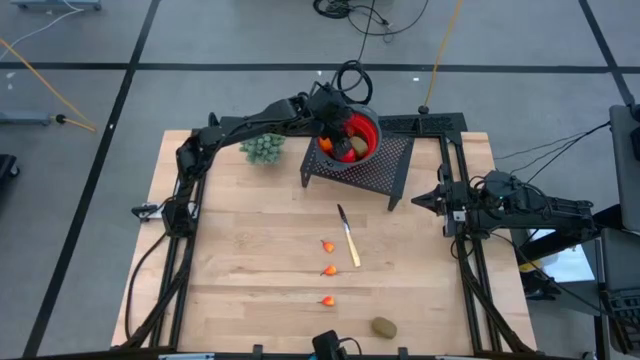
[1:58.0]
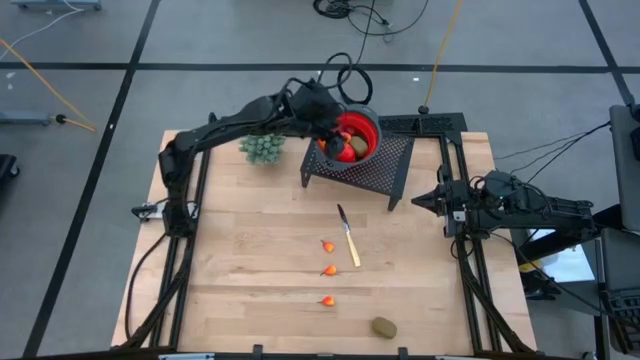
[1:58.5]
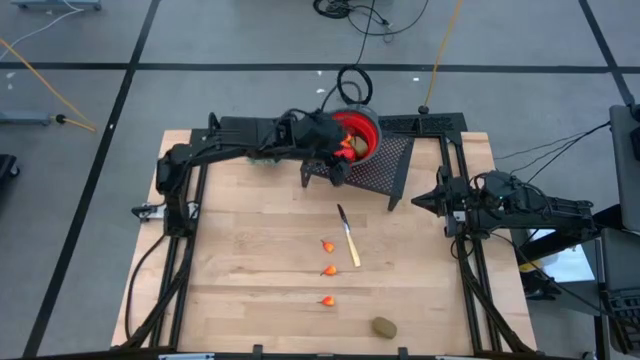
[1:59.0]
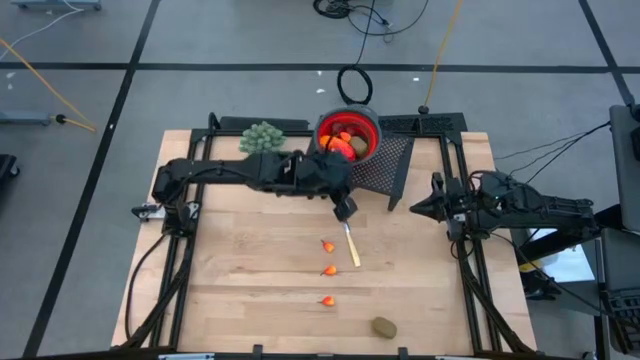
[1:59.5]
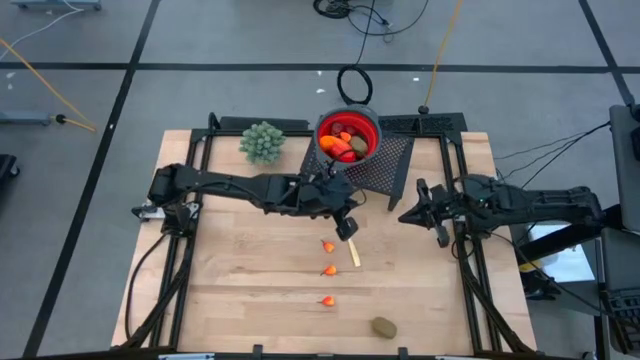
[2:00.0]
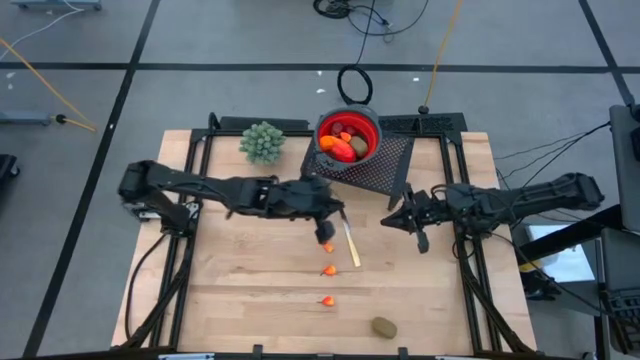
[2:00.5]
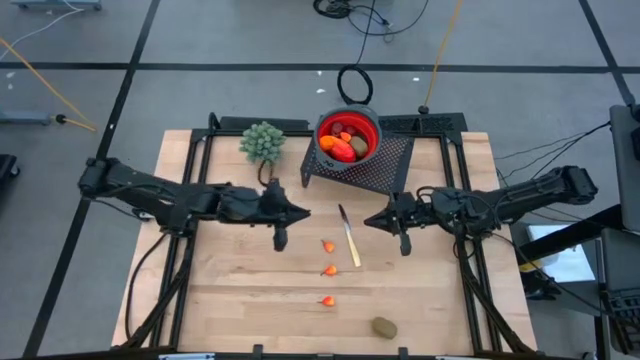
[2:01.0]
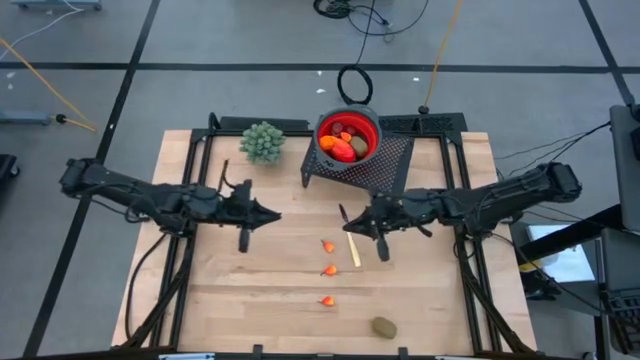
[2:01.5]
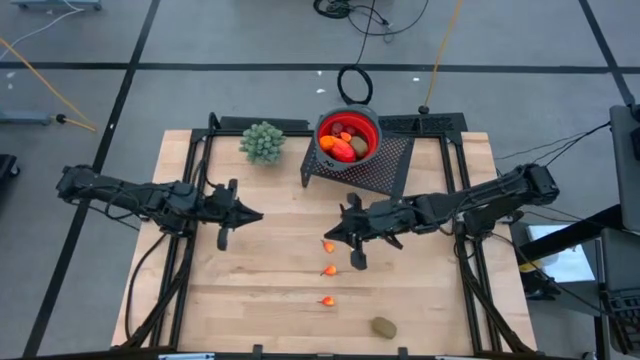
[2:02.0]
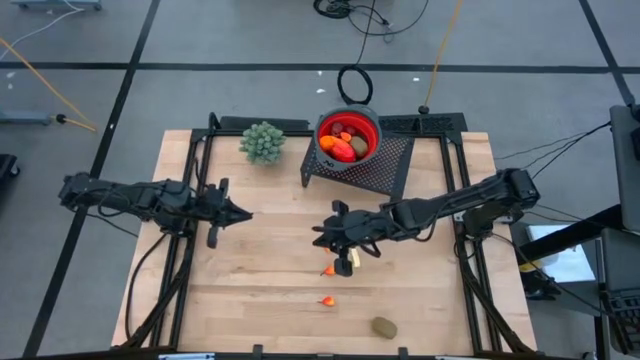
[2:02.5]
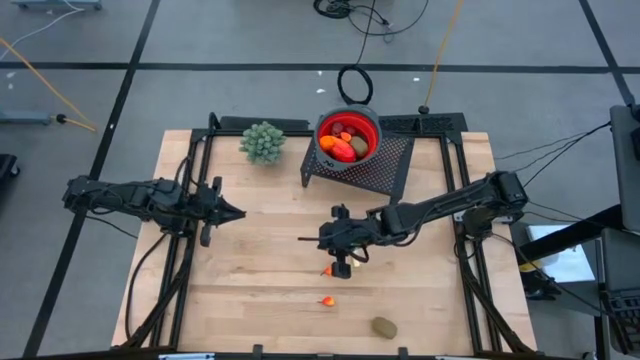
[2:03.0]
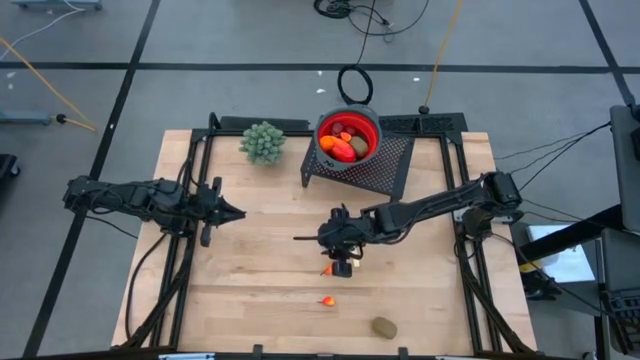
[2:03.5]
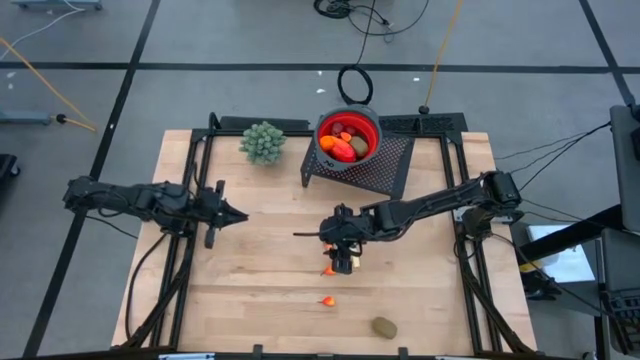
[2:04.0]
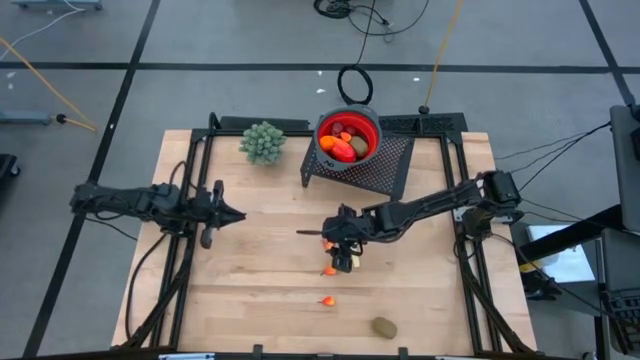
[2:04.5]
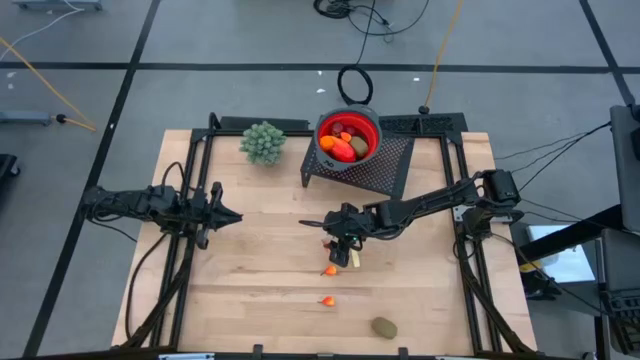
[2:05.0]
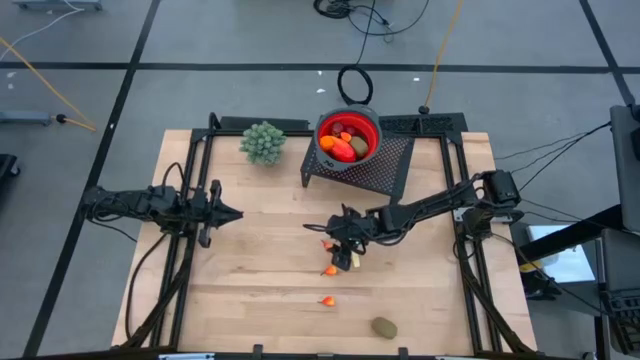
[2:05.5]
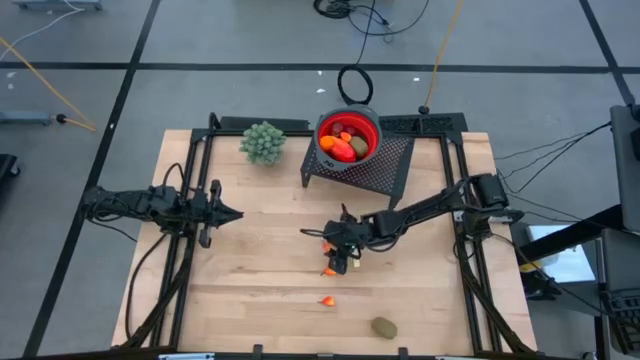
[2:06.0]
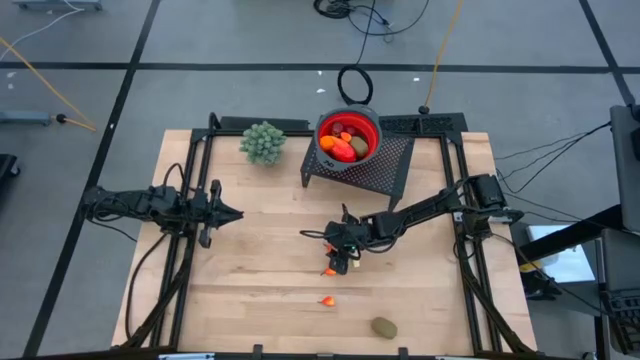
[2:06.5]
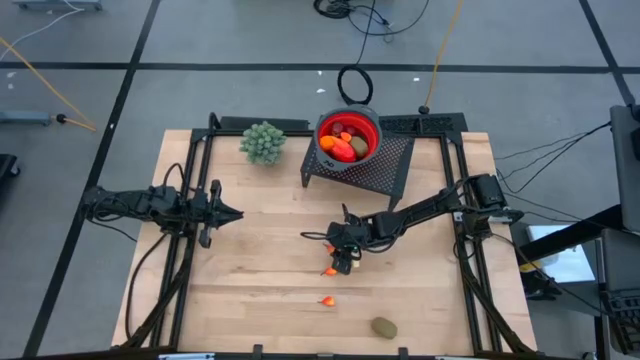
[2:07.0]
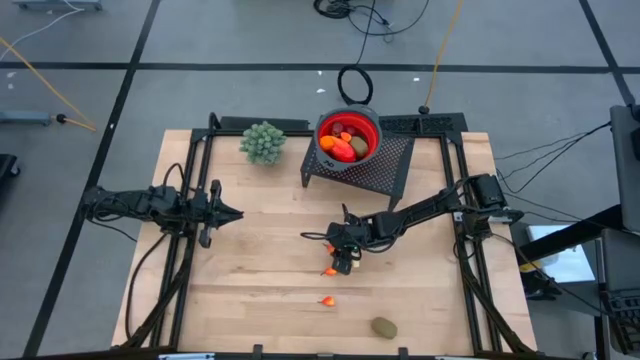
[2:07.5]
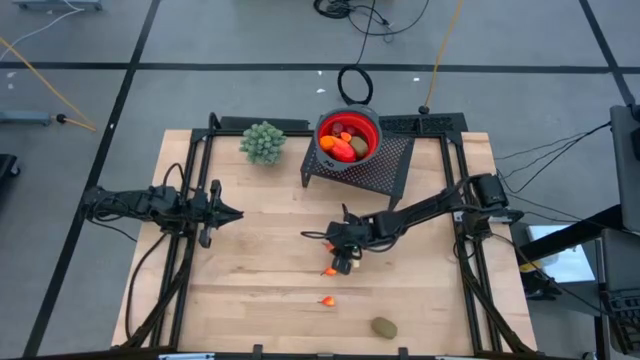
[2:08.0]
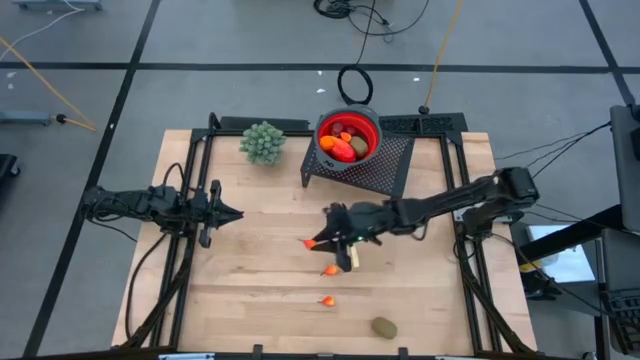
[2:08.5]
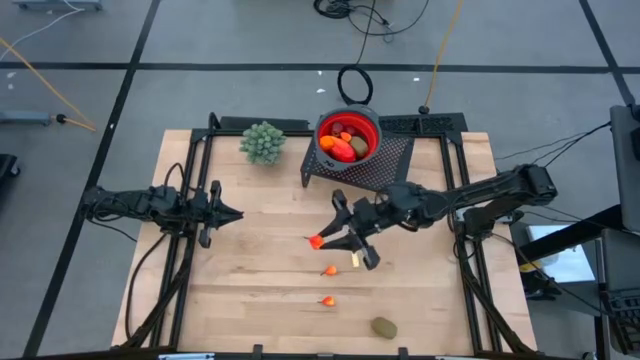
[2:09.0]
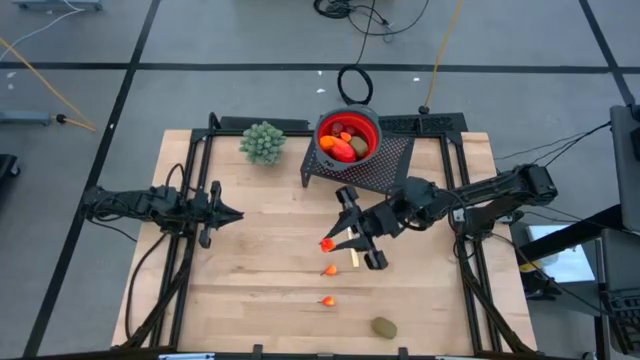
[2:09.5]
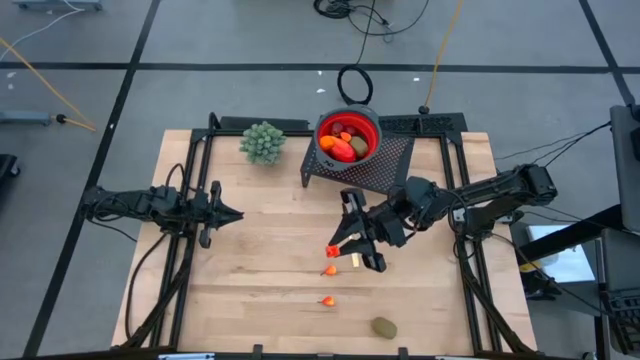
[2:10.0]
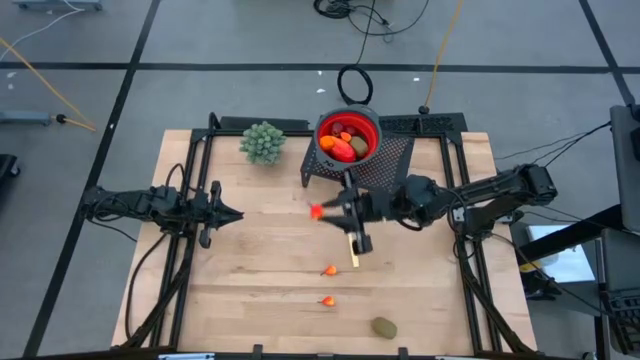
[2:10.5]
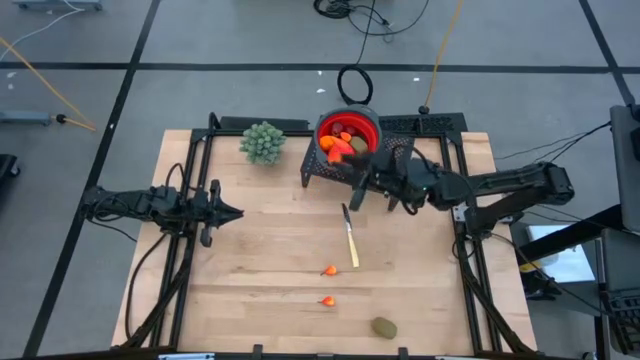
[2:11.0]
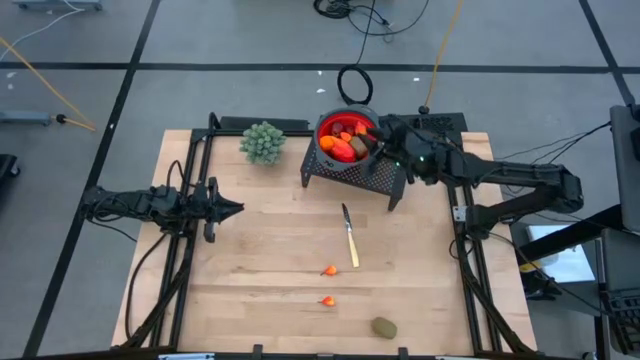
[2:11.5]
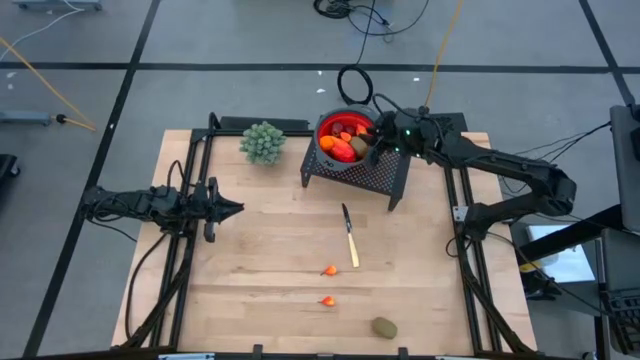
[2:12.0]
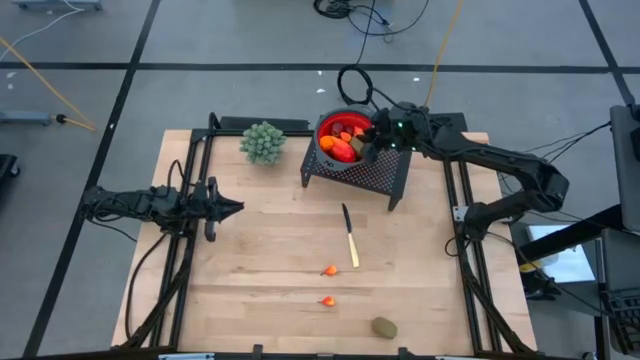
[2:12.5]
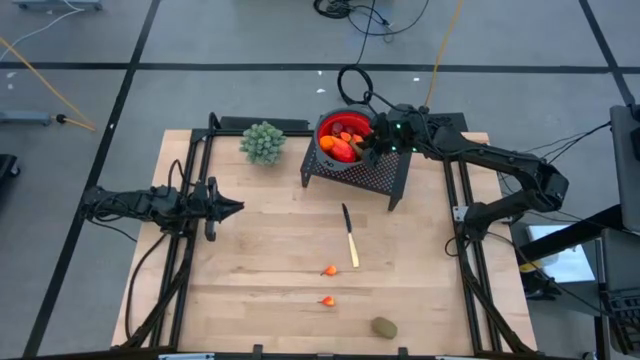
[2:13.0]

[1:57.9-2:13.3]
Task: Pick & Place Fruit
Put the orange pear into the red strainer bowl on the shelf

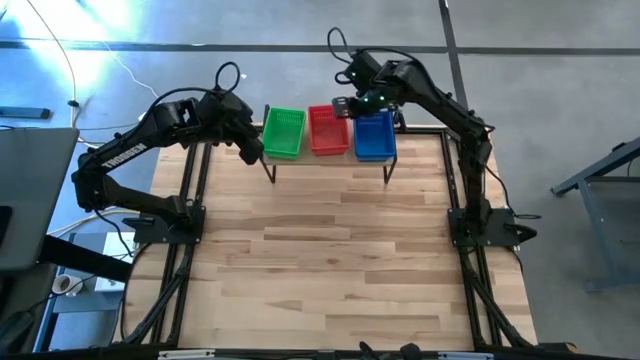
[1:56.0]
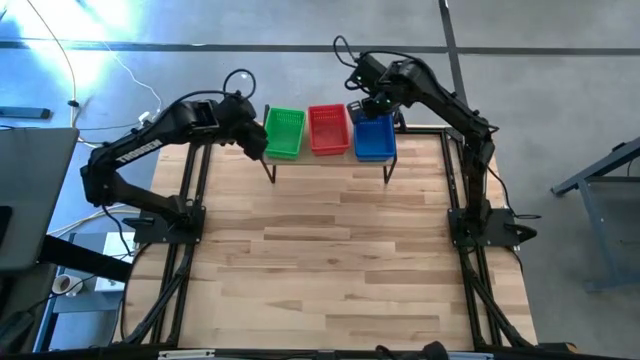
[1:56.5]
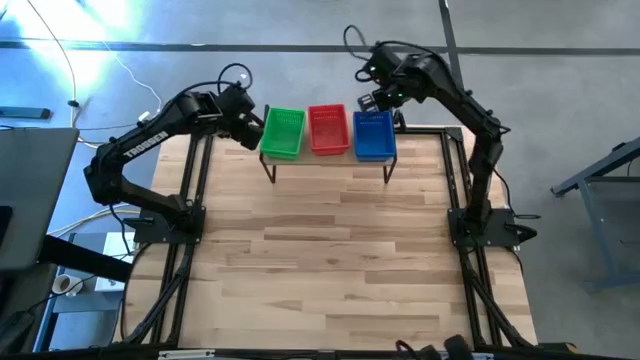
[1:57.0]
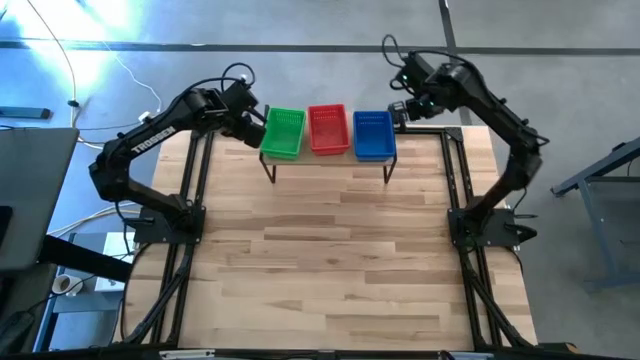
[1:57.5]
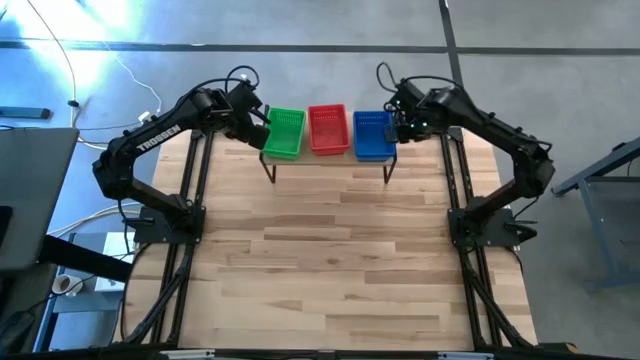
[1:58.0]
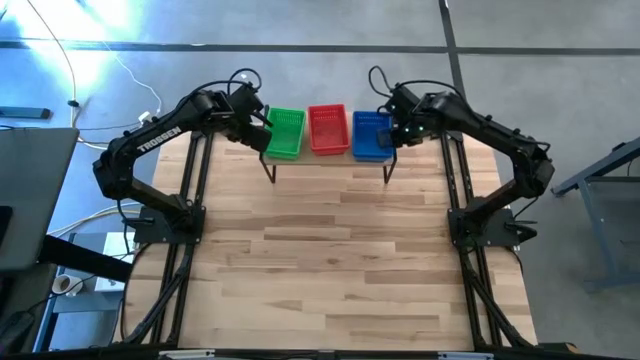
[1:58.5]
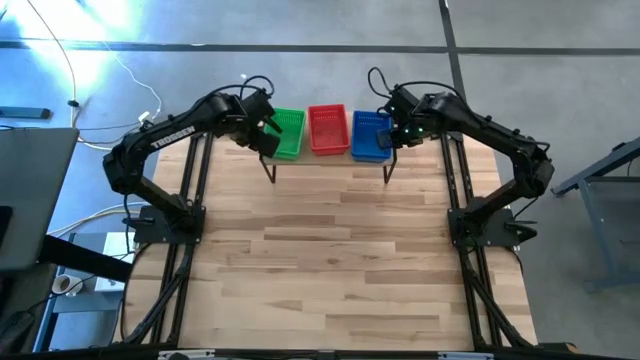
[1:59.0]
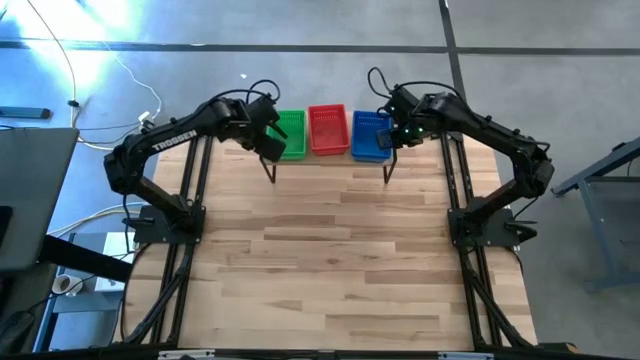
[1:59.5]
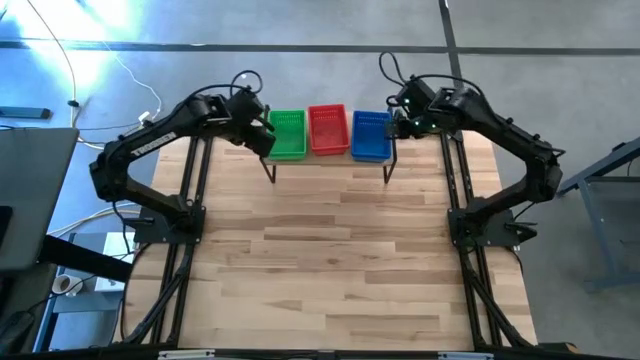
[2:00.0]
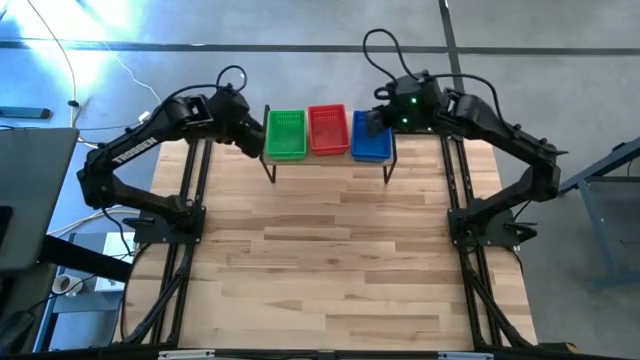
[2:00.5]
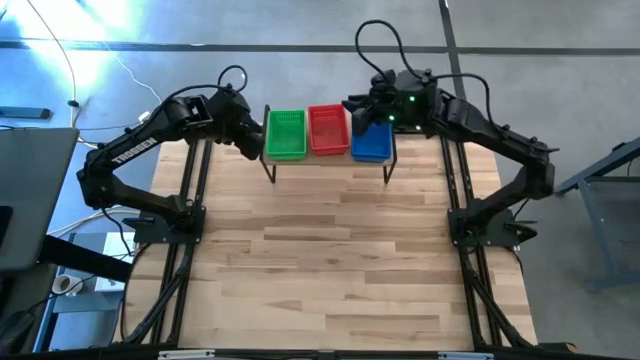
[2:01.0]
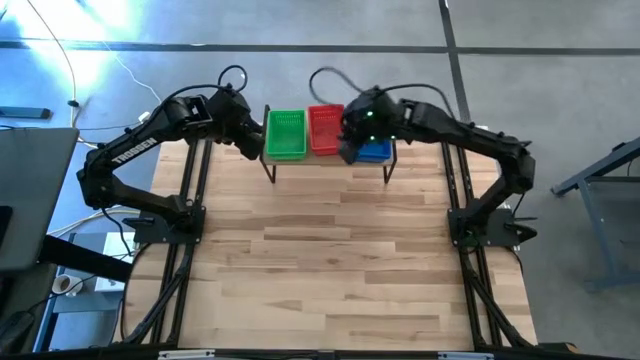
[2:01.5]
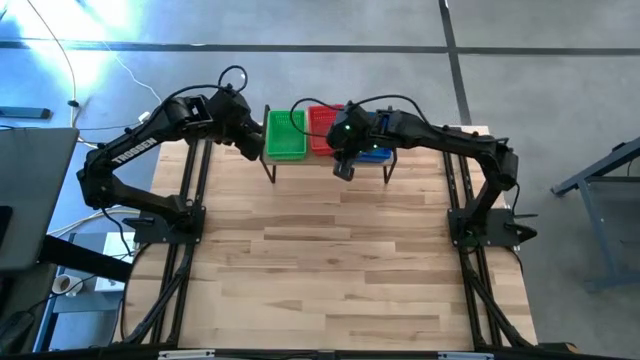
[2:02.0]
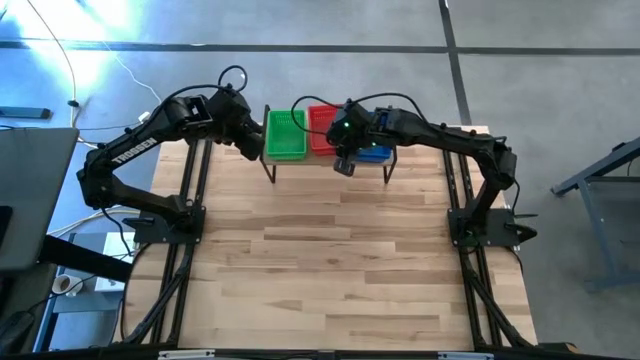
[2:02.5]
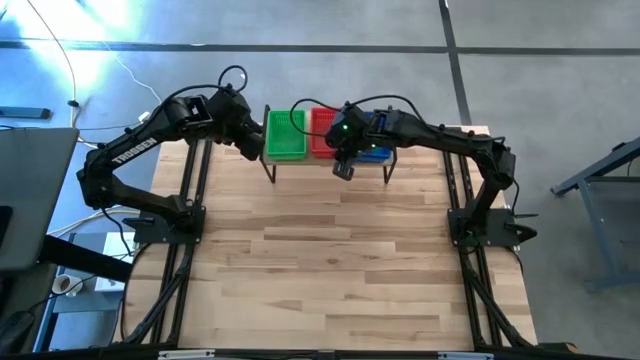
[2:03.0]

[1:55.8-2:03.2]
Task: Stack baskets on shelf by color
Adjust the stacked bins on the shelf
